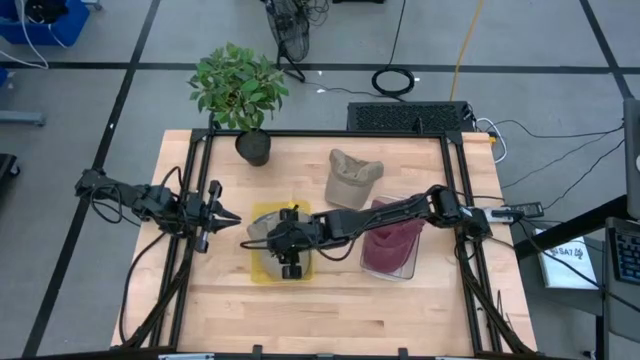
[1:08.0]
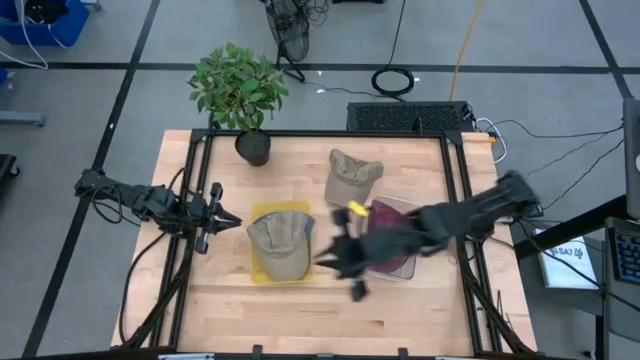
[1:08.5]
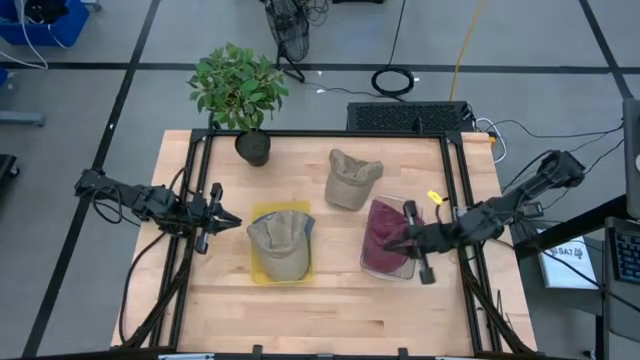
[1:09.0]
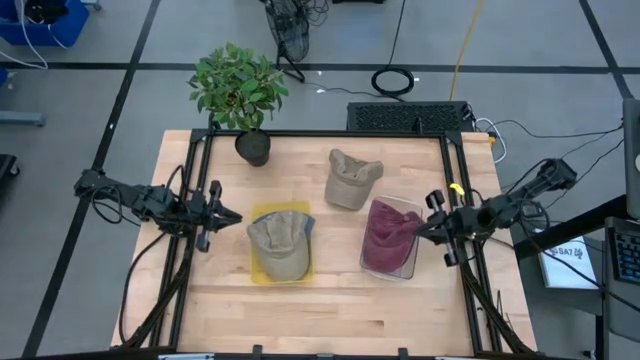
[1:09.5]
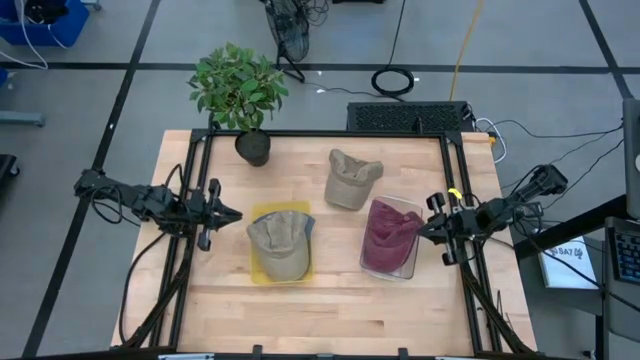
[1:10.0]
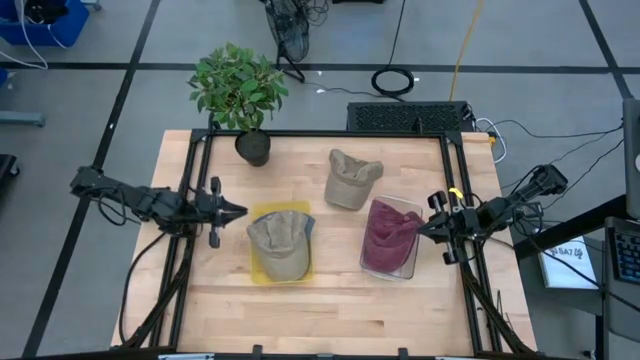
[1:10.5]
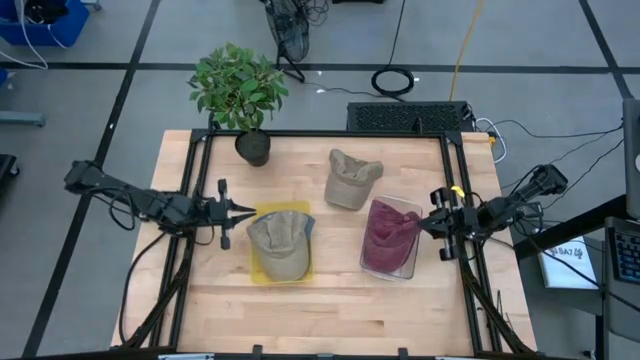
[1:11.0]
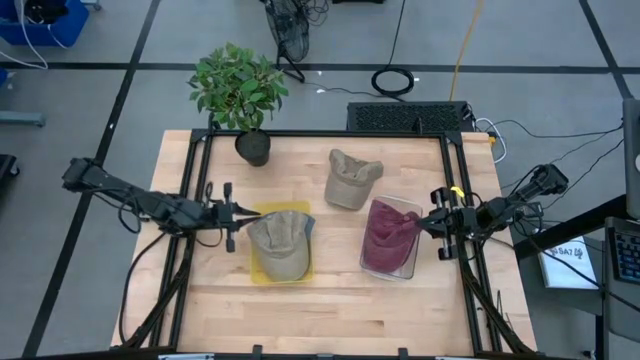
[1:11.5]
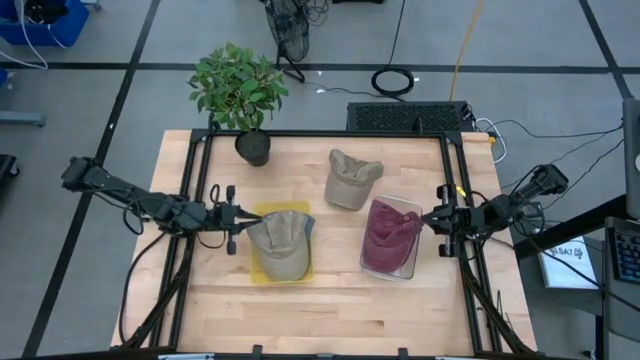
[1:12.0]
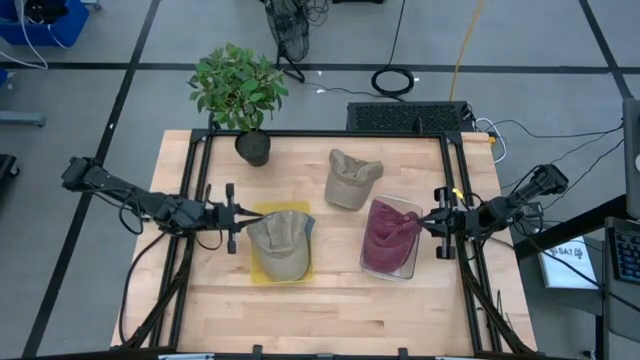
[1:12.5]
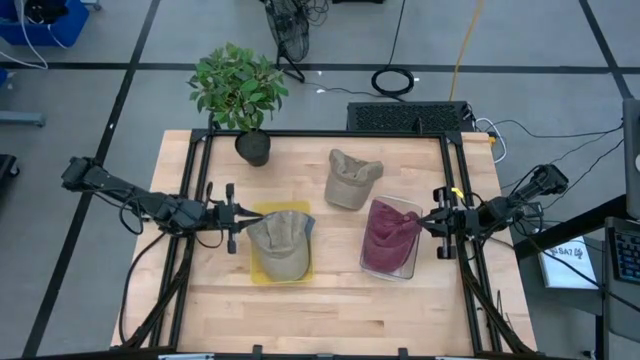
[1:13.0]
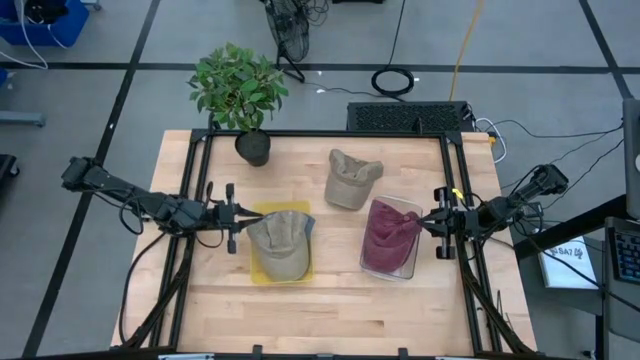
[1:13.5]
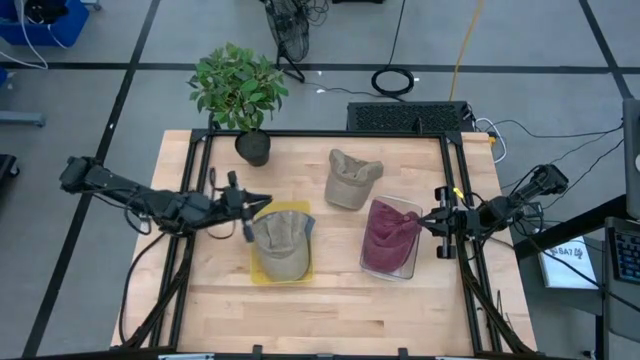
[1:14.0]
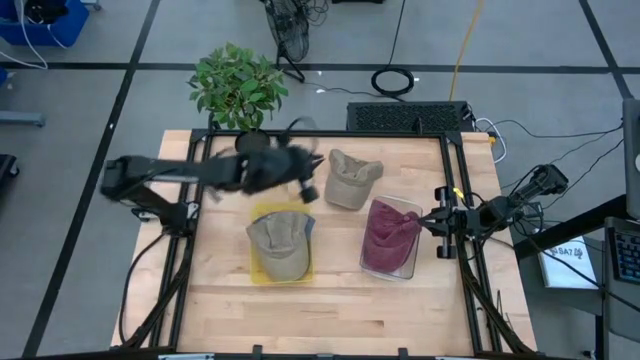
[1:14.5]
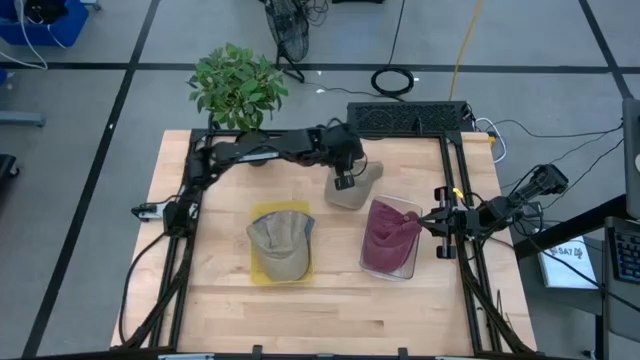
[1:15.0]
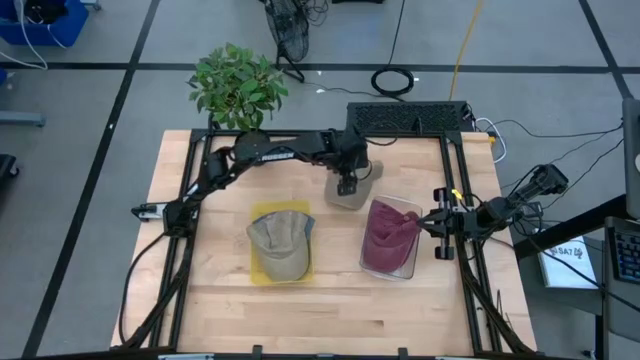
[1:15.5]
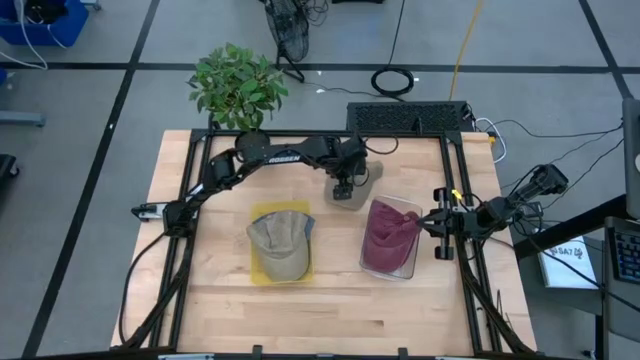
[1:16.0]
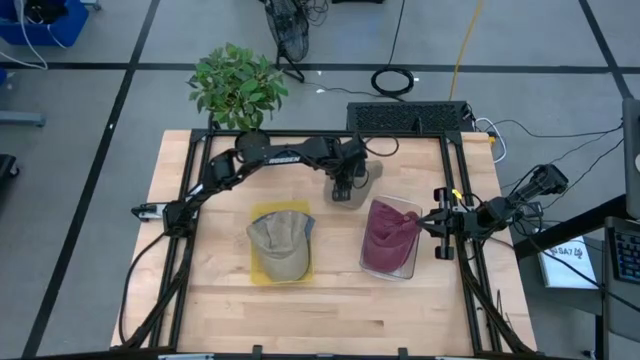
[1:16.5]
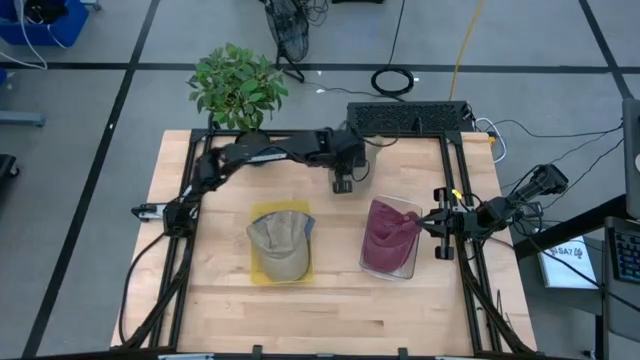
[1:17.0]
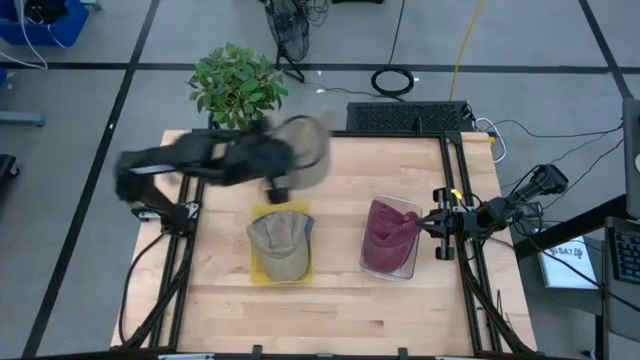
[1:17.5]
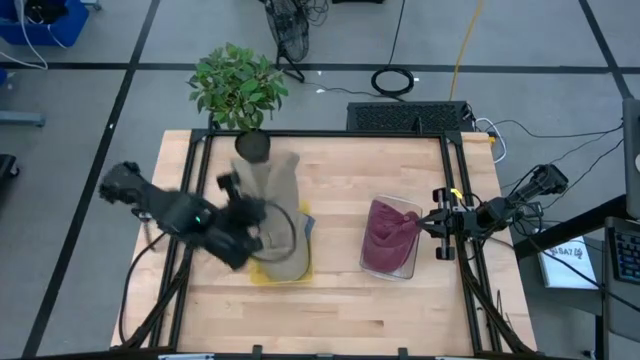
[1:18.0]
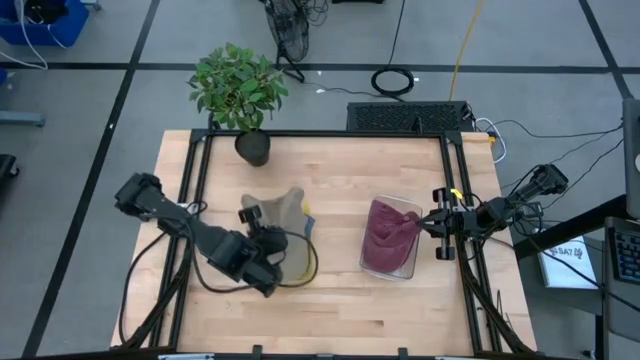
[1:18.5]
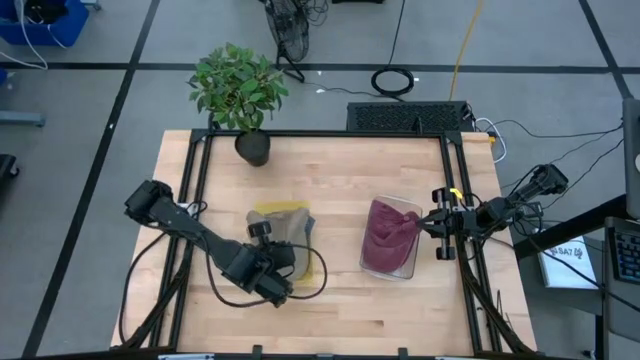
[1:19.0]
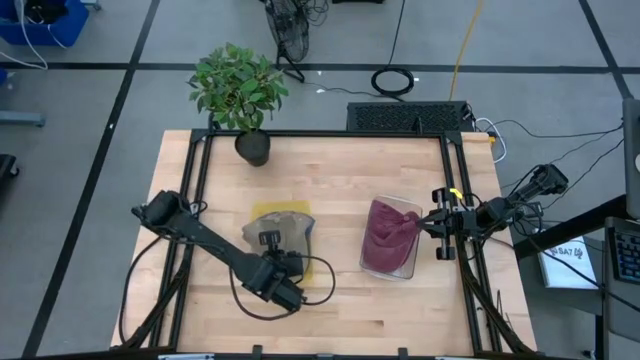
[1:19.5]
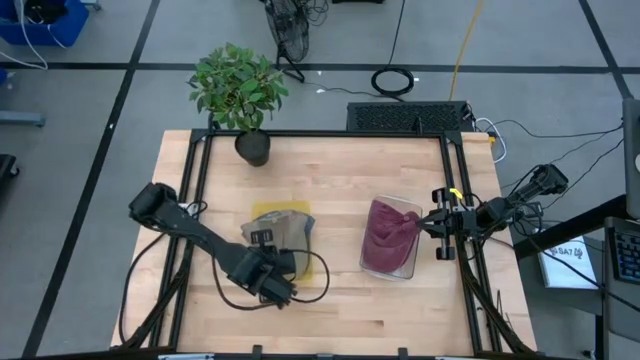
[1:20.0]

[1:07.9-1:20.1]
Task: Pick and place caps into container
Put the brown cap into the yellow container

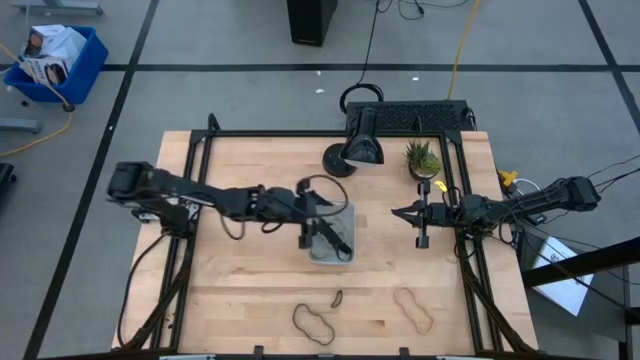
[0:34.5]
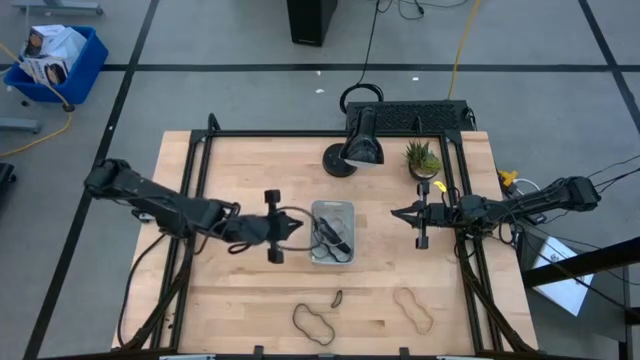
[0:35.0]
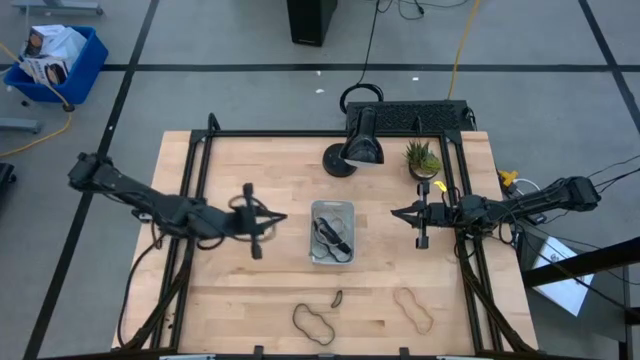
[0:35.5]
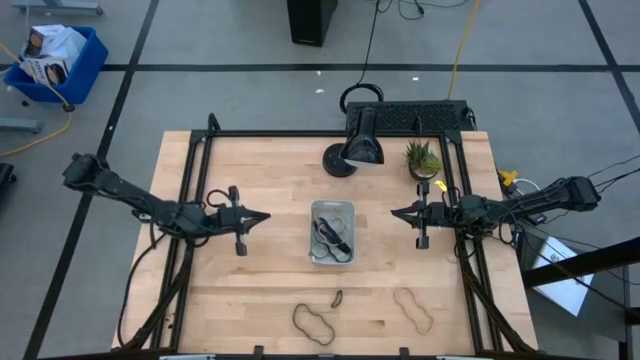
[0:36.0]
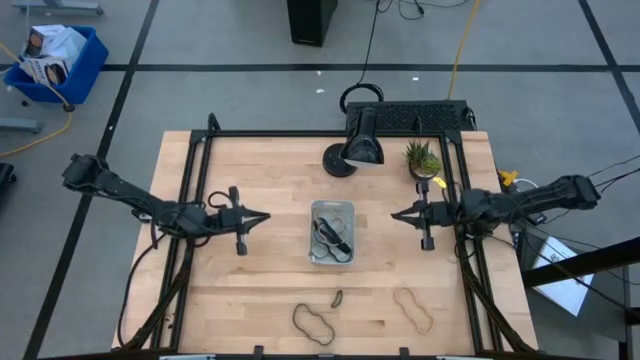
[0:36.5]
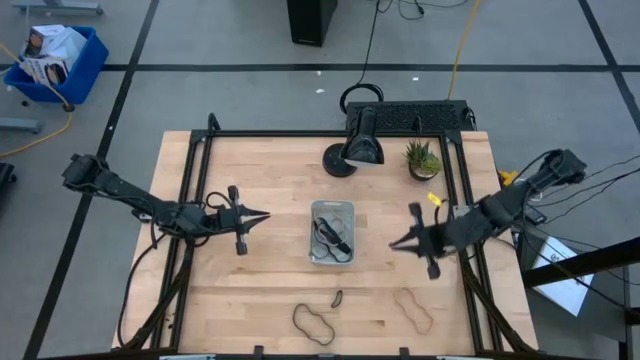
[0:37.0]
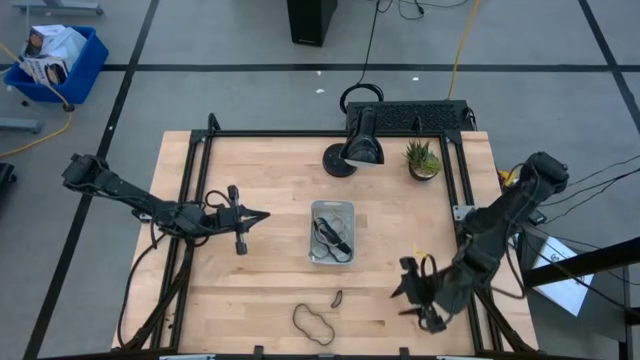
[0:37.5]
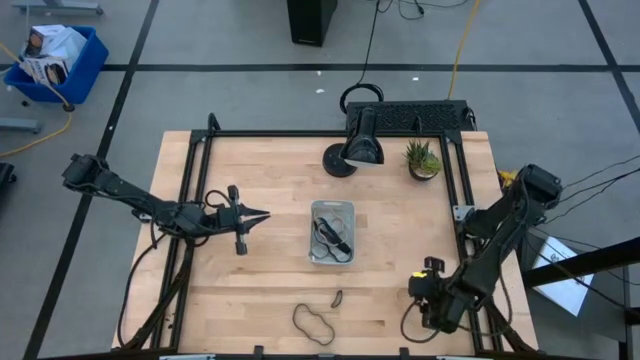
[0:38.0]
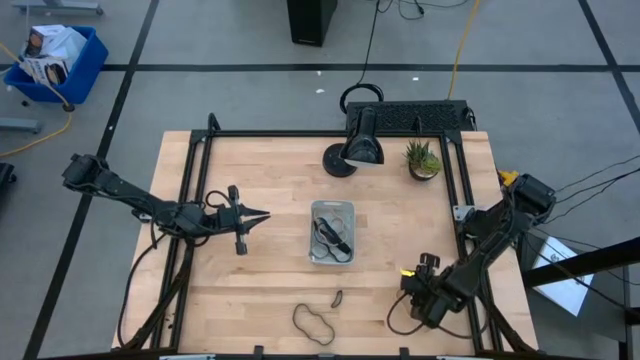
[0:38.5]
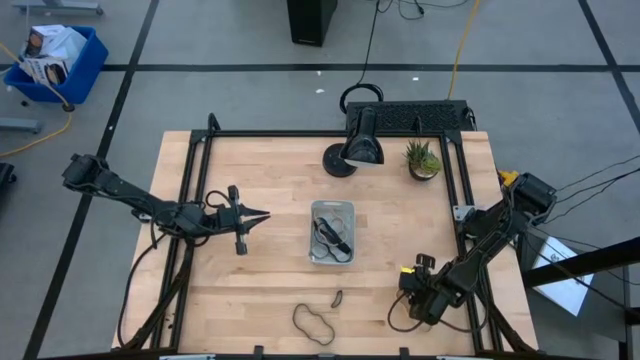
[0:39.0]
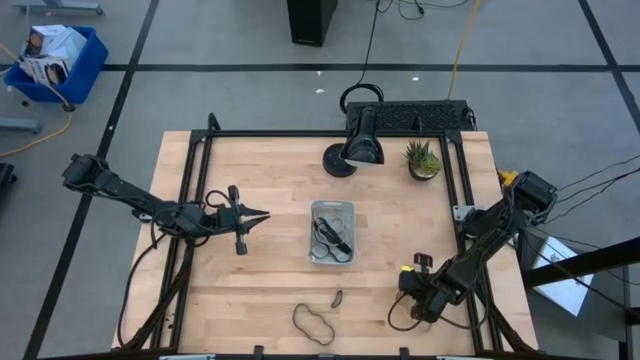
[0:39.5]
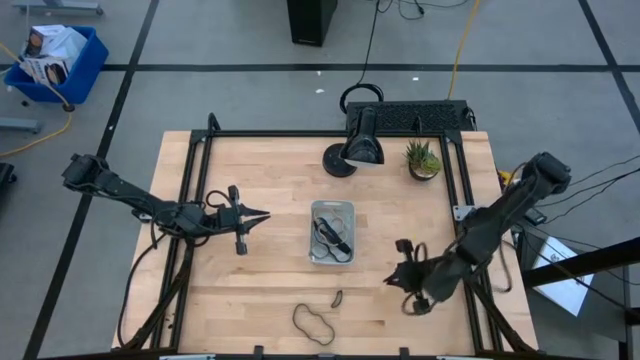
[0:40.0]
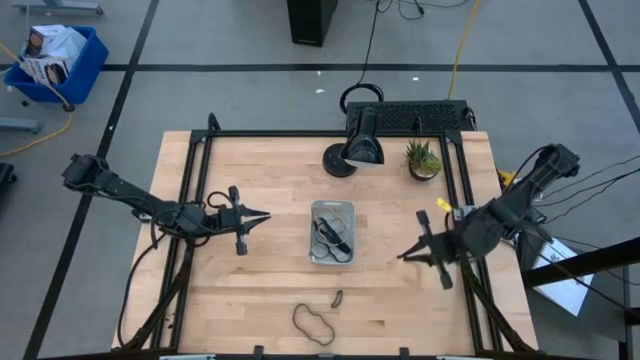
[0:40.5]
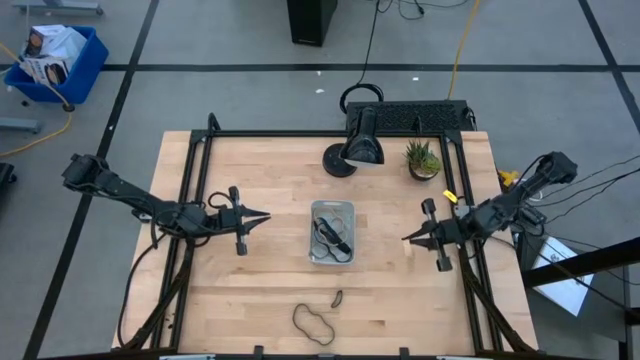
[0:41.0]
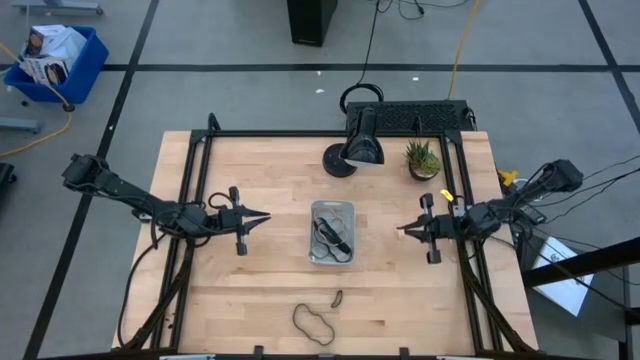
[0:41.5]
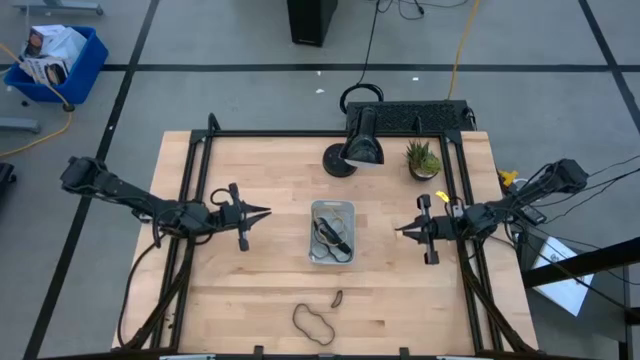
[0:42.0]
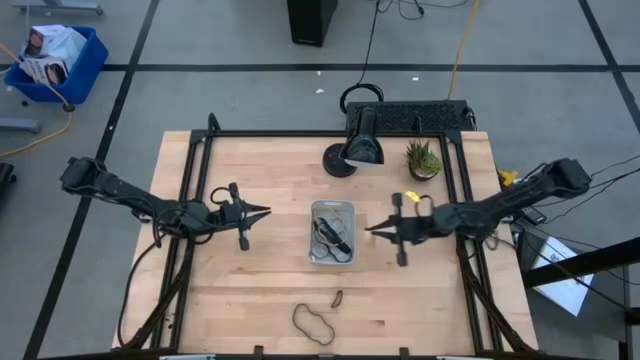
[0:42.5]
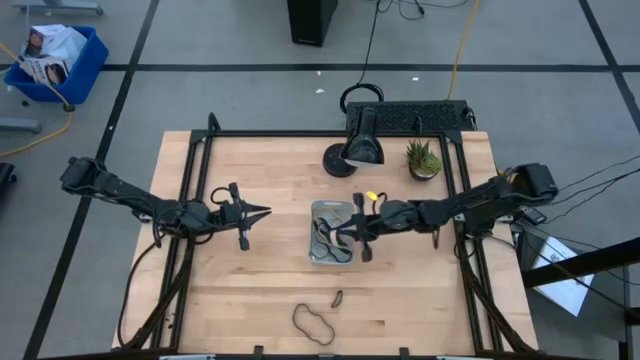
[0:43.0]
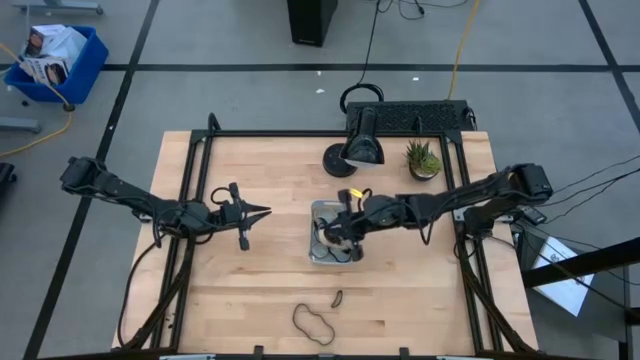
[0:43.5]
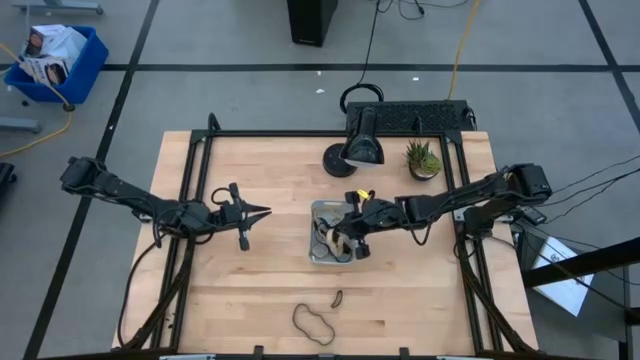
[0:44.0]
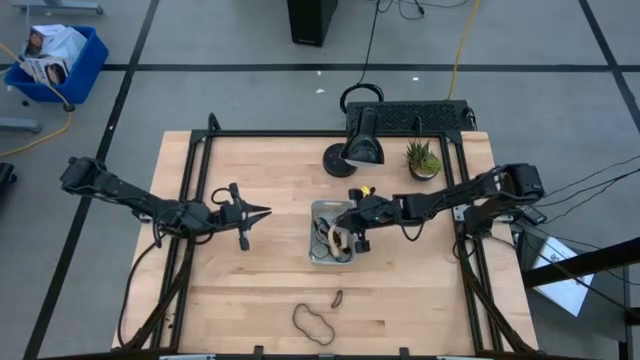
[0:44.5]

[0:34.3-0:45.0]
Task: Pick and place rubber bands into bin
Put the brown rubber band into the gray bin
